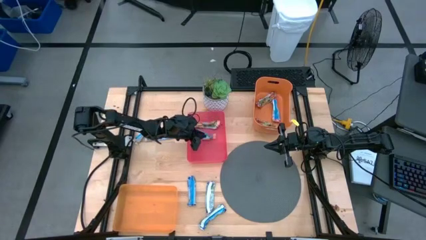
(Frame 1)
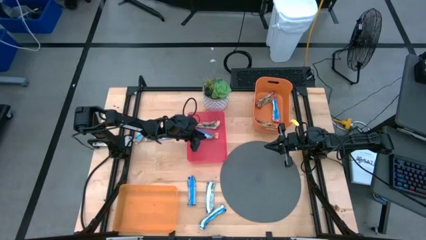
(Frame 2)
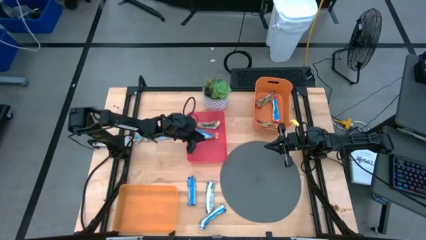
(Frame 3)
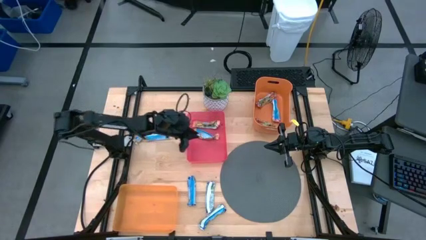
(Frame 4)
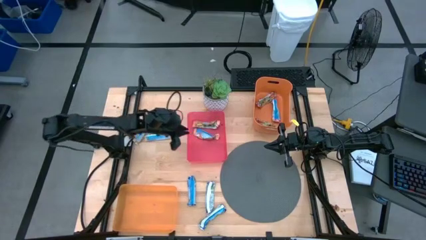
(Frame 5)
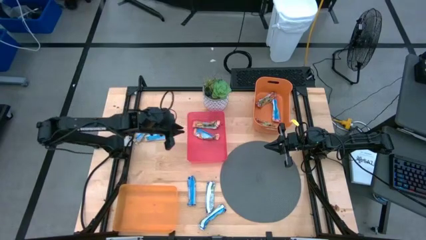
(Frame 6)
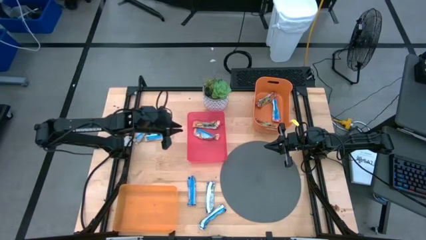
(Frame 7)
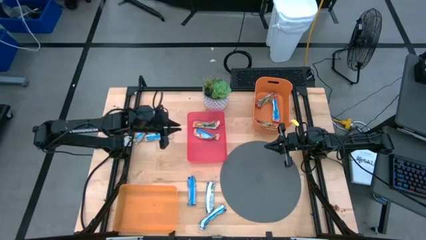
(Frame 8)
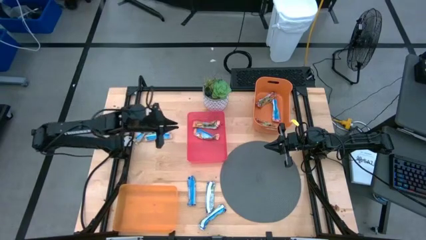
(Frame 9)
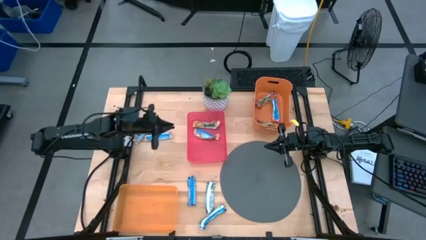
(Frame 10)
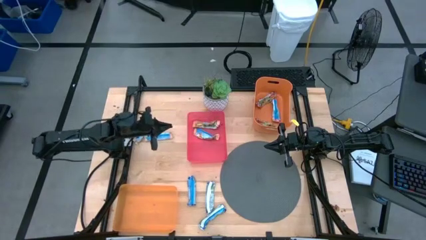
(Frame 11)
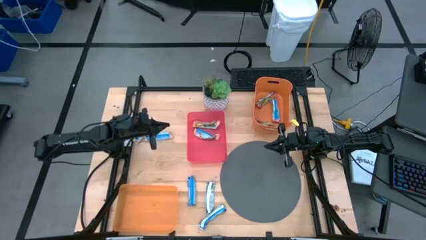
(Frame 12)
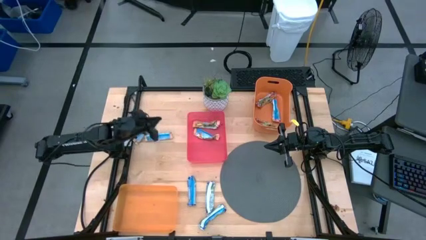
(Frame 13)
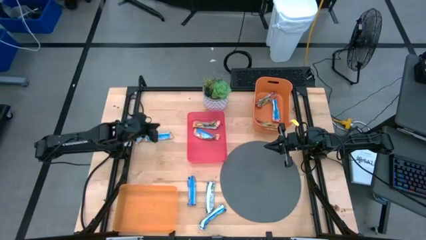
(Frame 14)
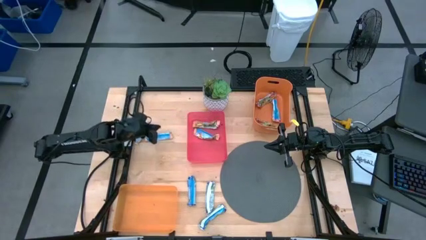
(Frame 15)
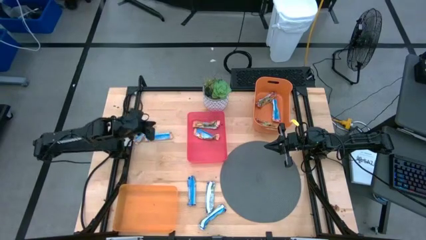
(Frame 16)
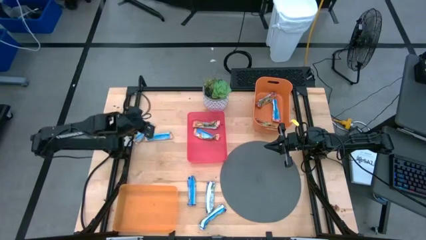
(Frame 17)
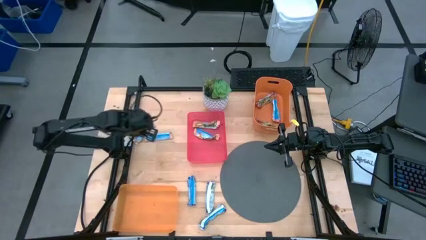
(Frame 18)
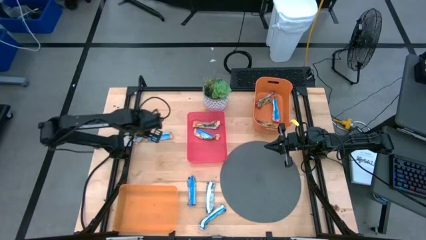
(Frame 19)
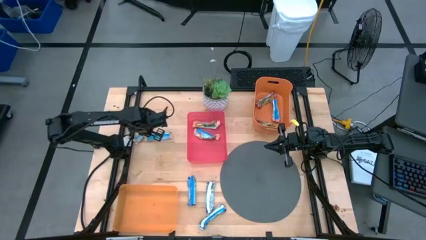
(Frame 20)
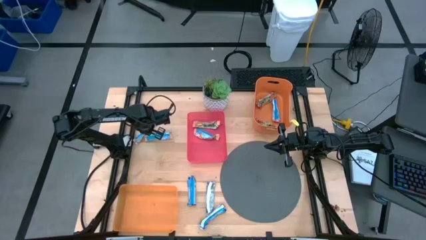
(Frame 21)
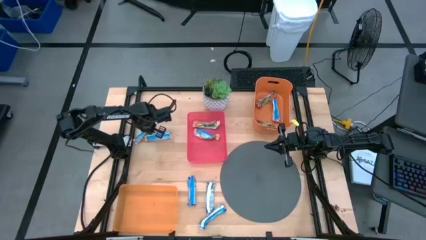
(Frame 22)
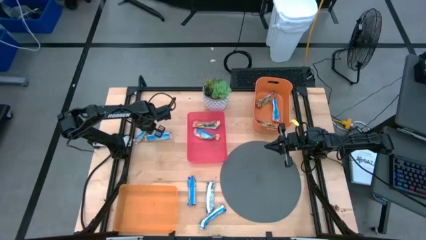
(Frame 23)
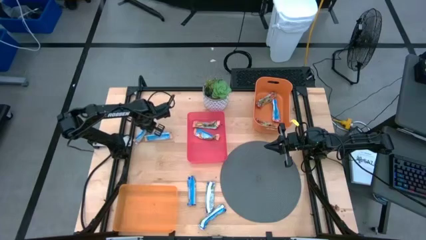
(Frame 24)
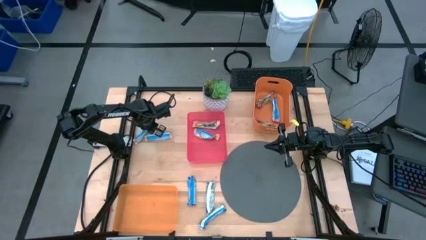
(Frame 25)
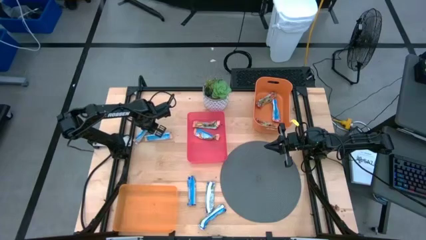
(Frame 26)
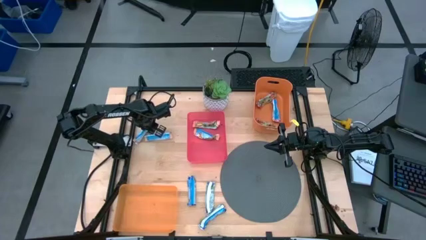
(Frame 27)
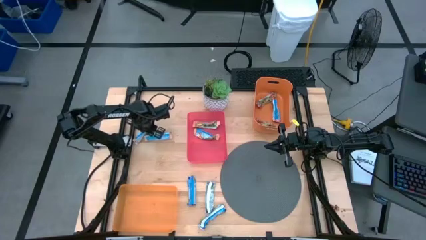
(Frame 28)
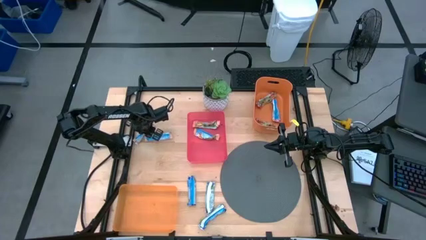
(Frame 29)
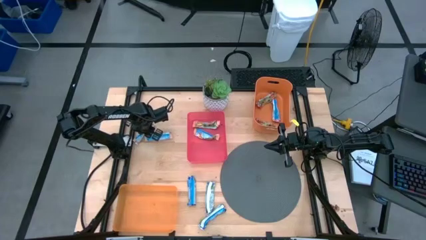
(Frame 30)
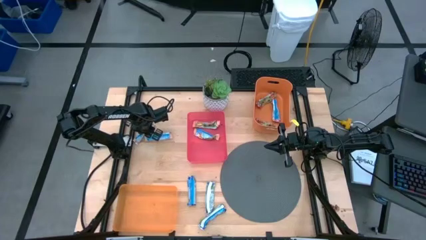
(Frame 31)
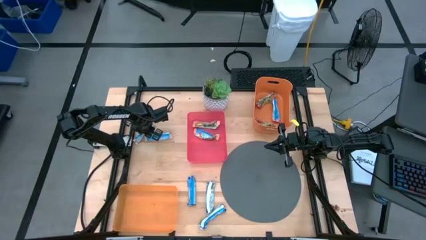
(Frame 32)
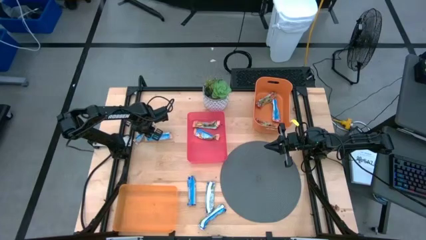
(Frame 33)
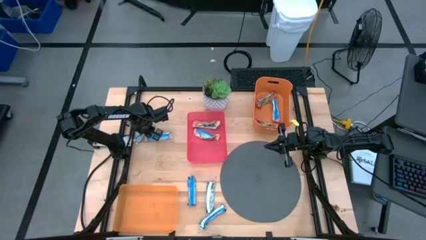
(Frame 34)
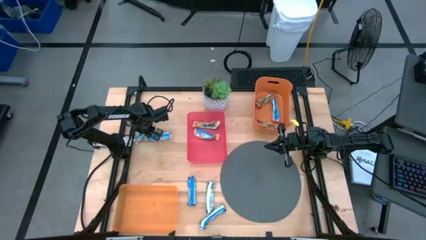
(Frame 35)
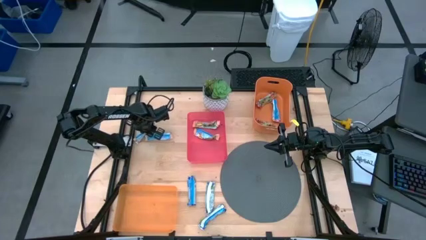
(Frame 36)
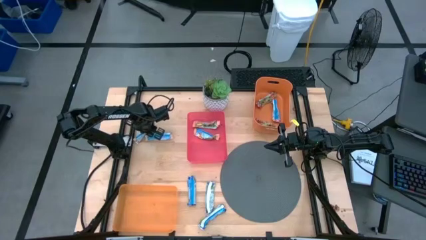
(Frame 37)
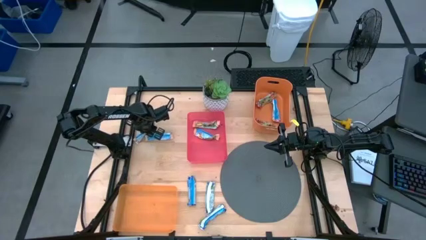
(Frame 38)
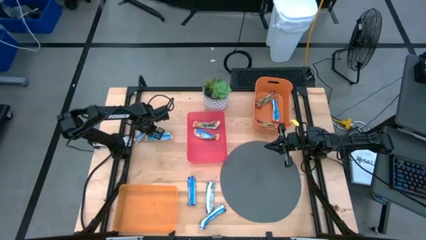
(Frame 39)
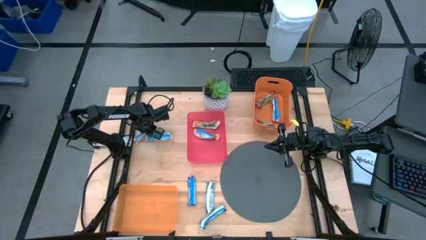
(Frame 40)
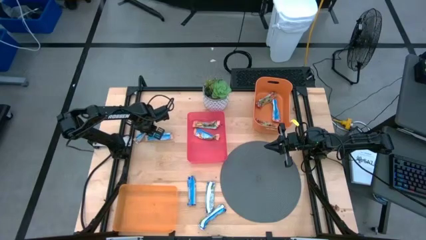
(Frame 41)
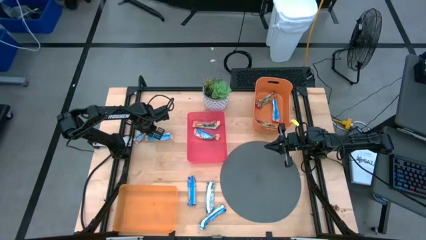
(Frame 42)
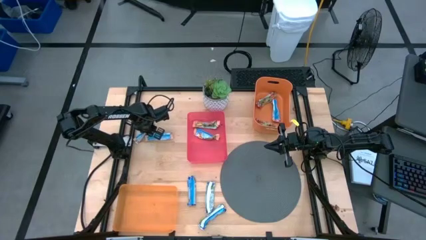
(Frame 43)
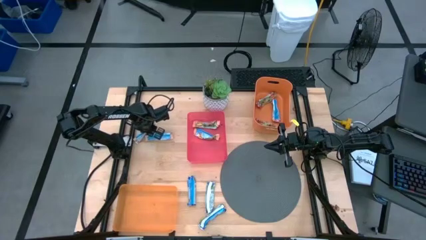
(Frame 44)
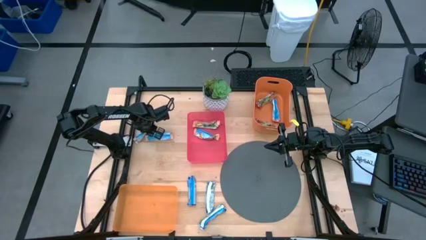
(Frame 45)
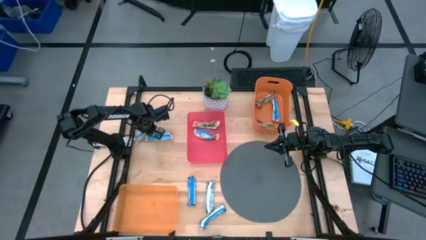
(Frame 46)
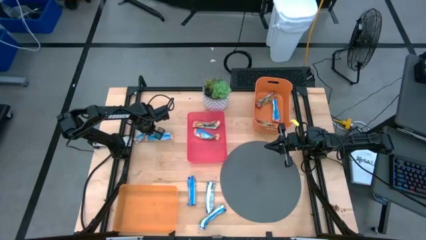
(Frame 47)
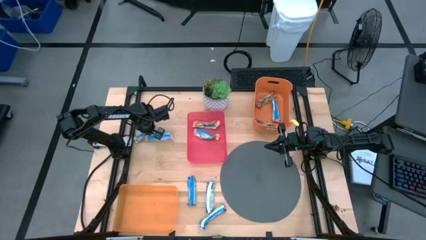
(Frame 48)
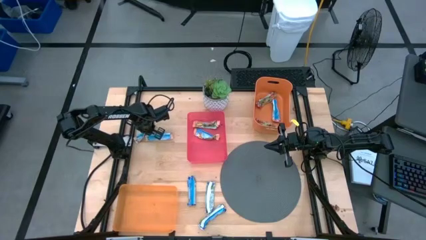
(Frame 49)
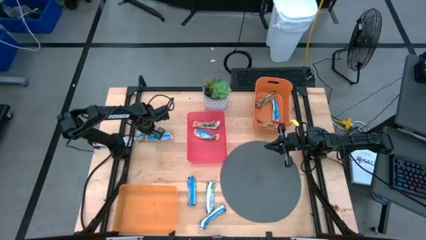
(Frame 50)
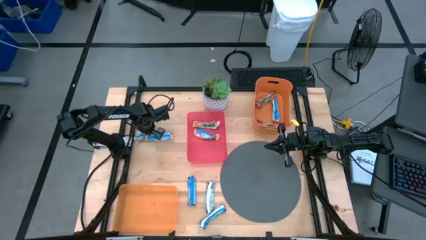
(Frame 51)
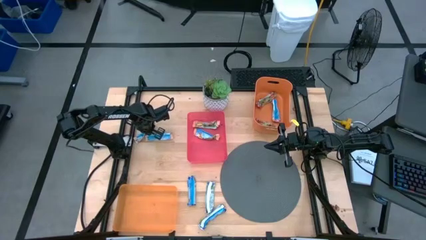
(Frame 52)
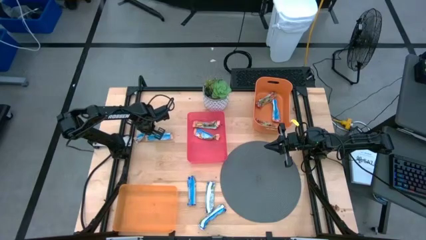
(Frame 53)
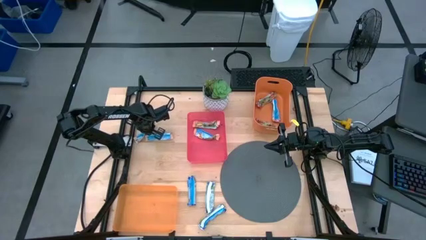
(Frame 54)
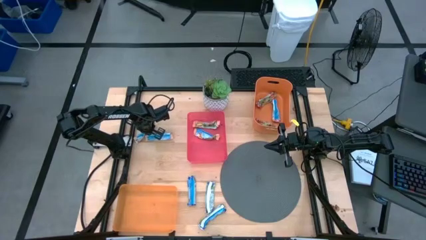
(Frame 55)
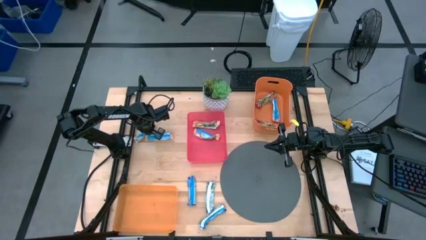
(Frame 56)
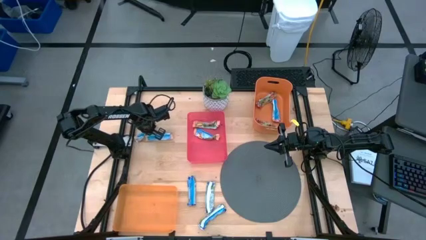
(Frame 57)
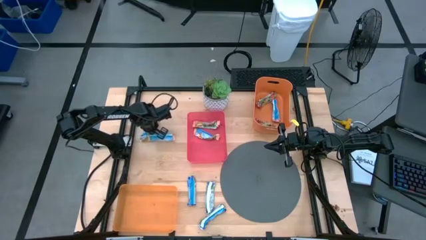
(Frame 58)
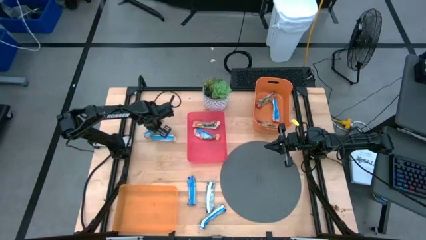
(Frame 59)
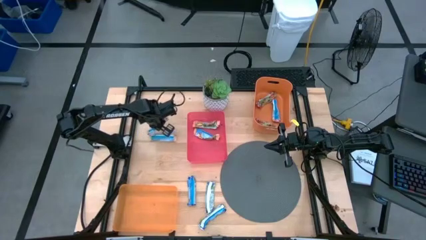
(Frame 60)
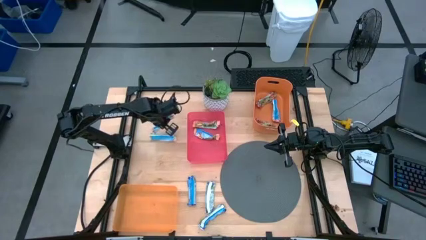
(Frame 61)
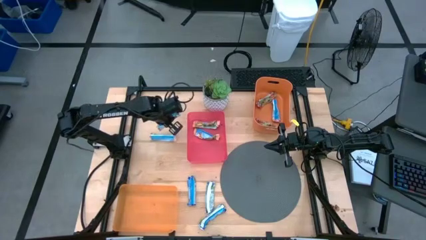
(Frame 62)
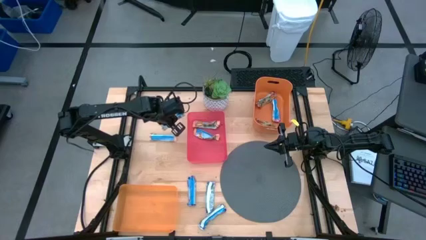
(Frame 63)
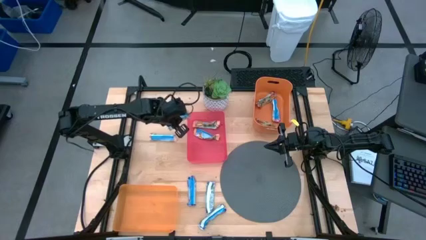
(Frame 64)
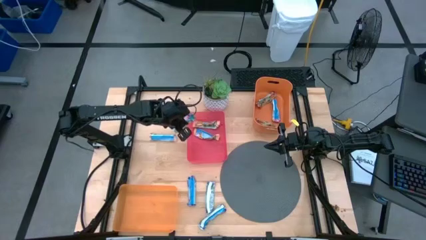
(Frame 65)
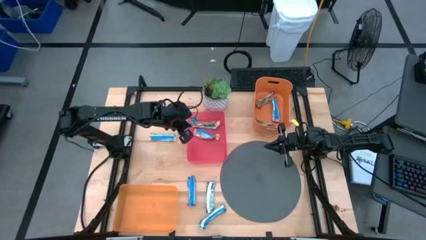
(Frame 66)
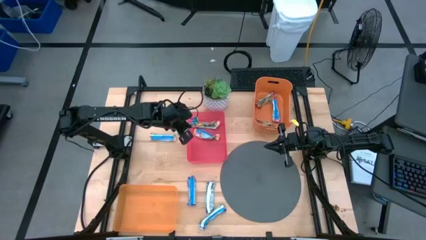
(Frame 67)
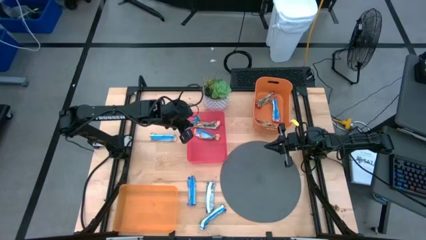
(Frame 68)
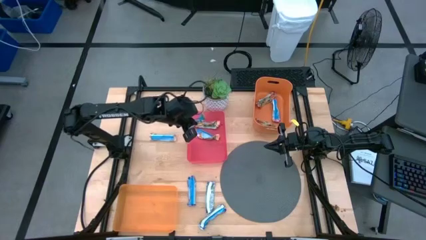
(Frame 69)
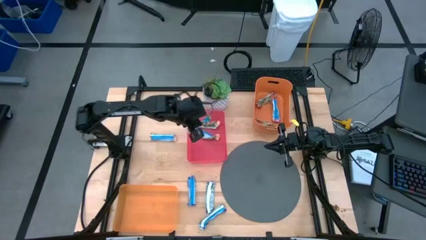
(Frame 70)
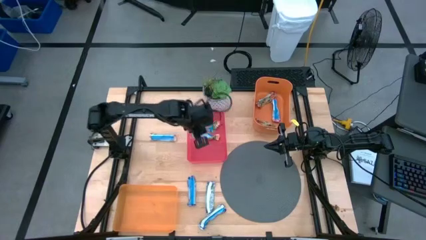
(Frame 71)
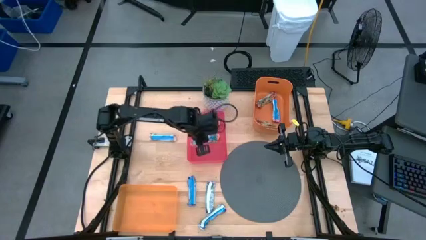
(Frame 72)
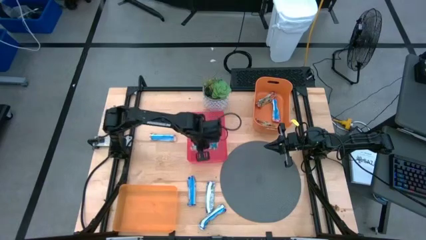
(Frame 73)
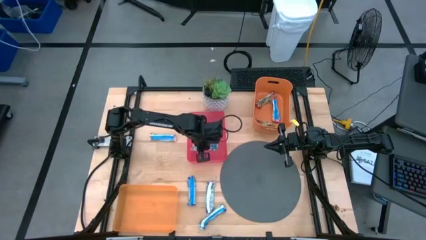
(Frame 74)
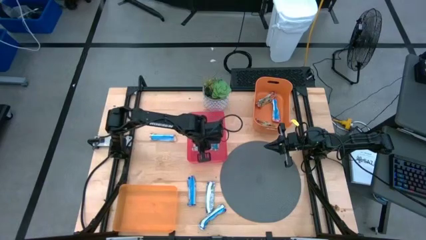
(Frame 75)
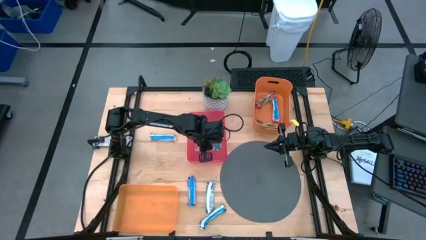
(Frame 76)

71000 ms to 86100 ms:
Task: Pick and place Granola Bars by type
Put the blue/orange granola bar into the pink bin
